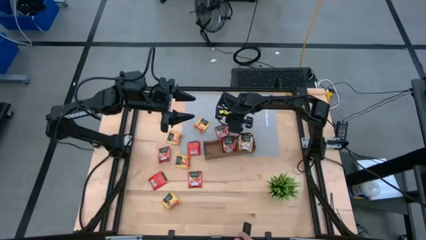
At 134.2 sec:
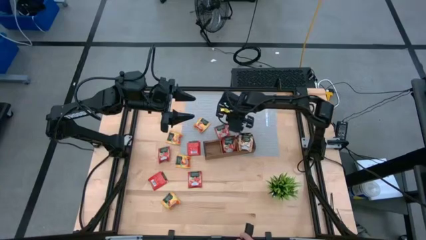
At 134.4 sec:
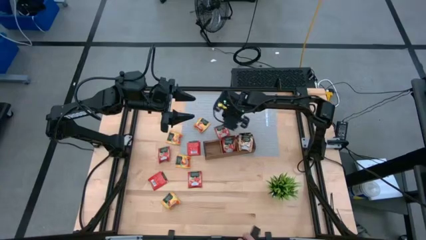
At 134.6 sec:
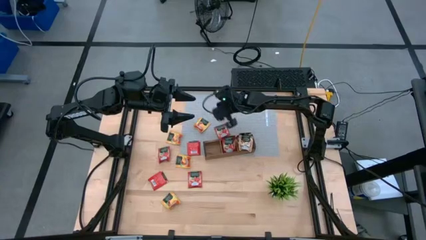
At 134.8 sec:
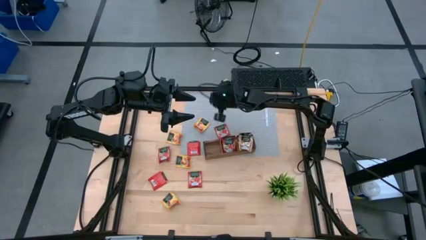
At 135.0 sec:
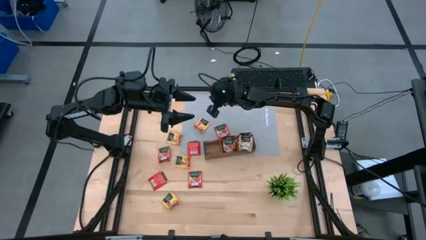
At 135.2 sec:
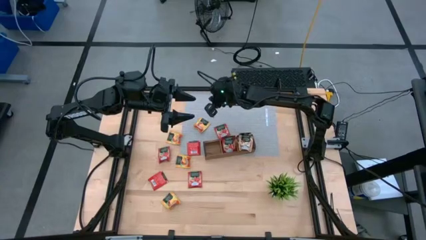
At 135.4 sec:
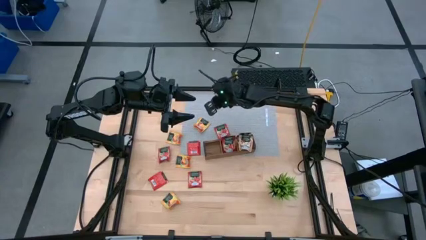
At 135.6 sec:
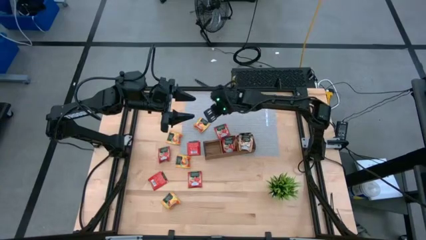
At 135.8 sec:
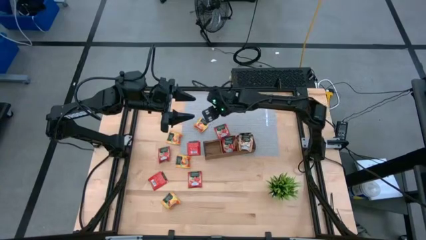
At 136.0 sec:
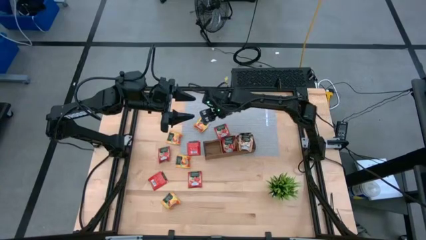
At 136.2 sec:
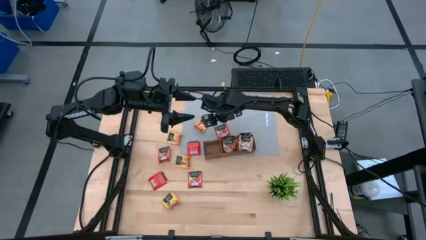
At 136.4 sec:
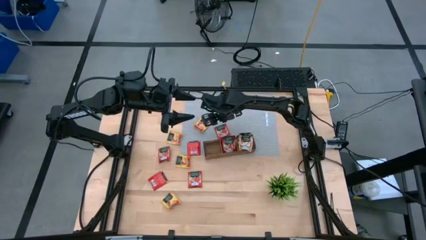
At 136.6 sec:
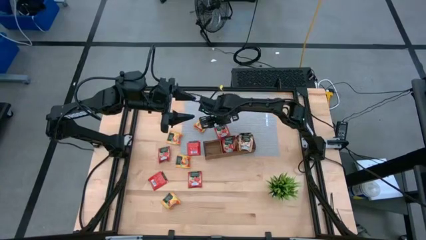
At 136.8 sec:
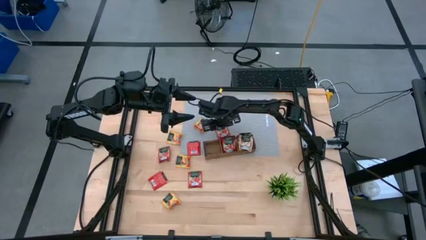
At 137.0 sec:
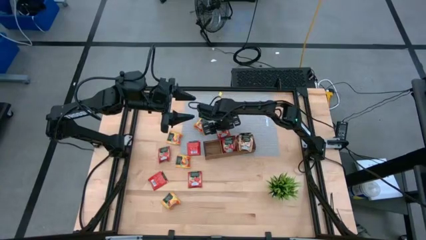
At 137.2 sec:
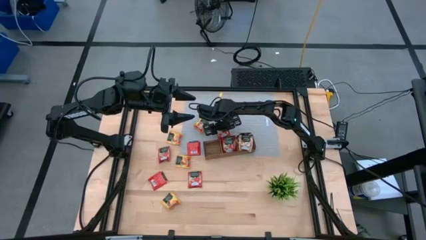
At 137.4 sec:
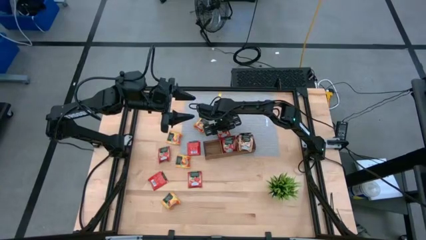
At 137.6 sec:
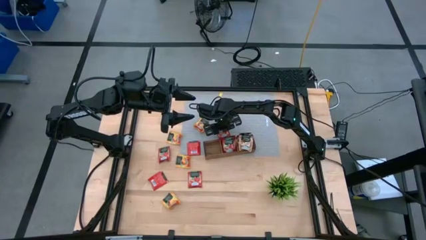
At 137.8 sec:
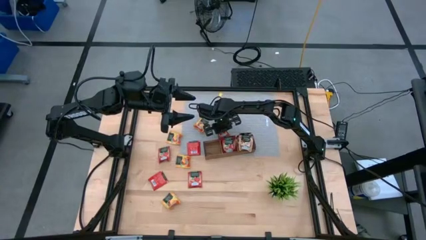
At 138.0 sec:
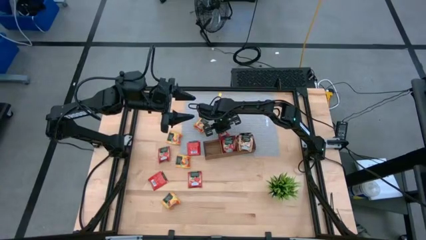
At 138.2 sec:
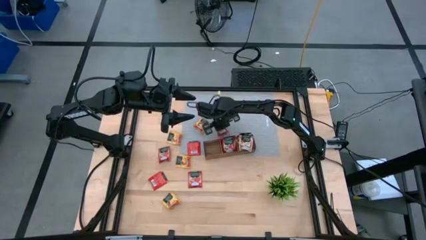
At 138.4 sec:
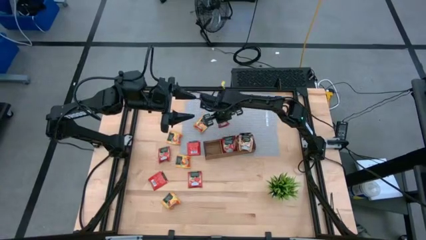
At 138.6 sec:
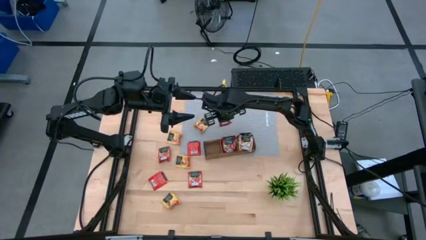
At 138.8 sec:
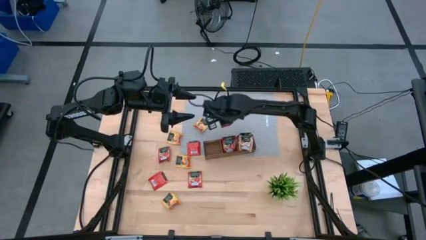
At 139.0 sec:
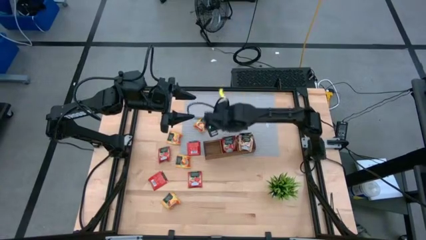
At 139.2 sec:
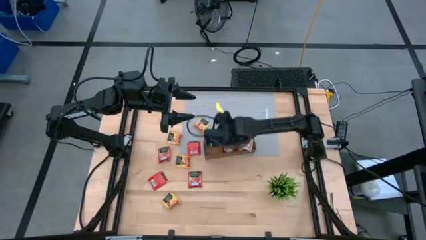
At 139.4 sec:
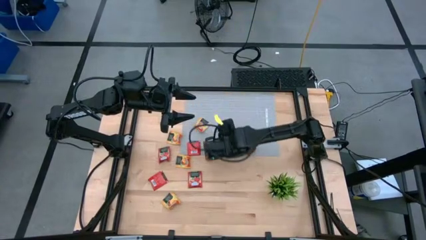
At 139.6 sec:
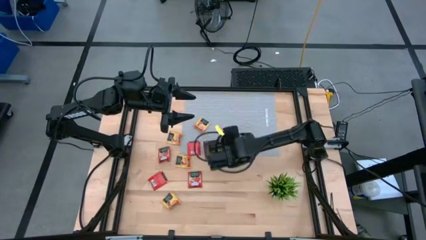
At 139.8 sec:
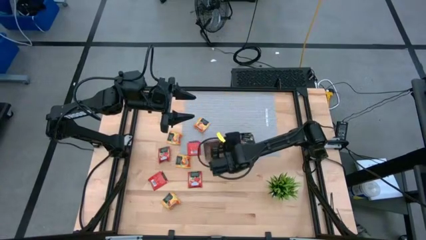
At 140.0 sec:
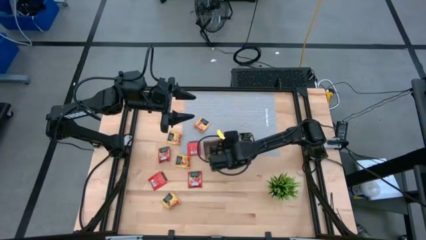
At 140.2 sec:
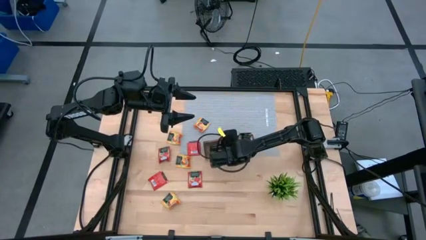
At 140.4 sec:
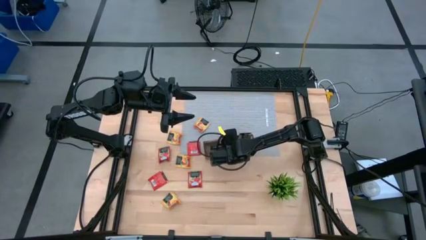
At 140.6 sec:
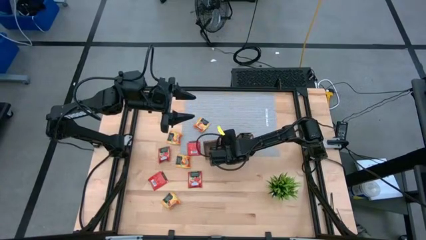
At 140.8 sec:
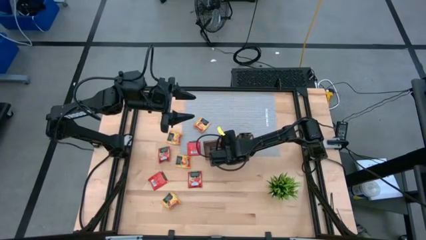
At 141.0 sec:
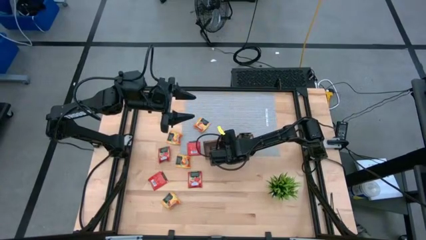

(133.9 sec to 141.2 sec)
Task: Pick & Place Tea
Put the red tea bag into the middle section of the wooden organizer

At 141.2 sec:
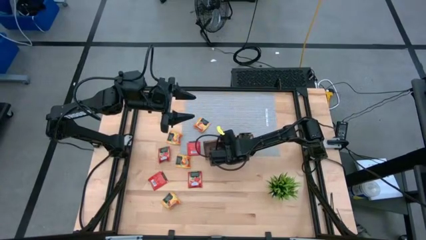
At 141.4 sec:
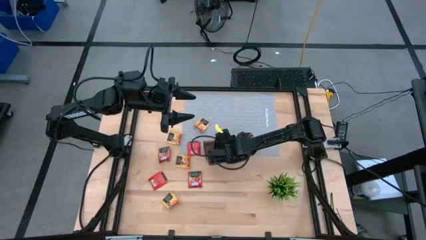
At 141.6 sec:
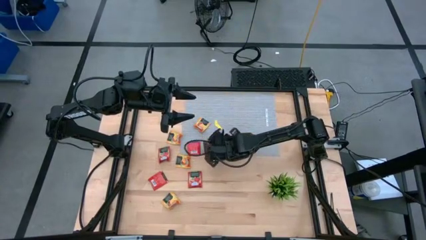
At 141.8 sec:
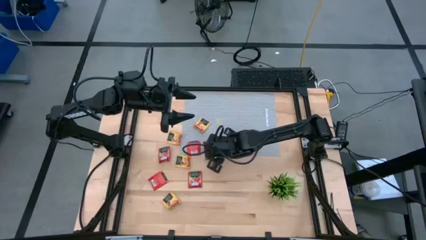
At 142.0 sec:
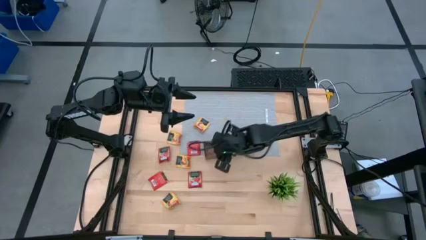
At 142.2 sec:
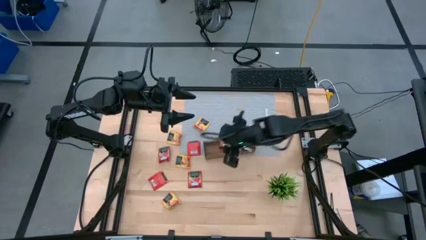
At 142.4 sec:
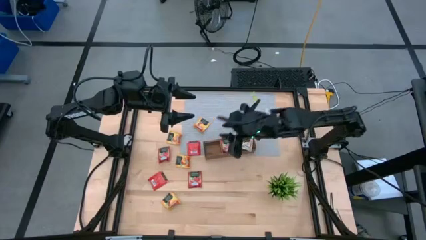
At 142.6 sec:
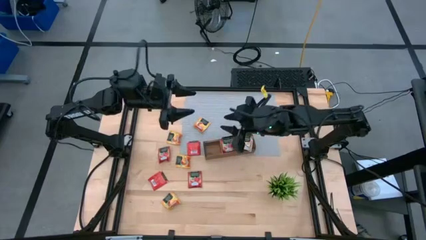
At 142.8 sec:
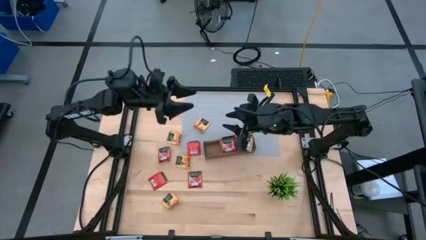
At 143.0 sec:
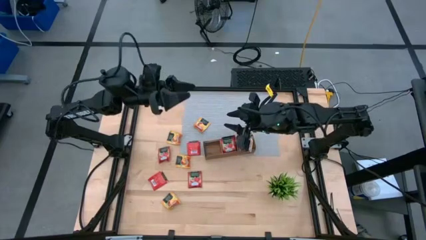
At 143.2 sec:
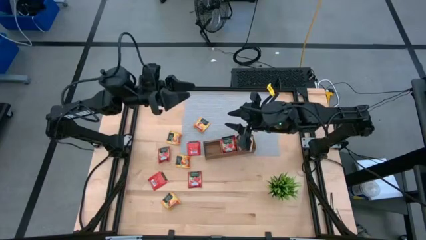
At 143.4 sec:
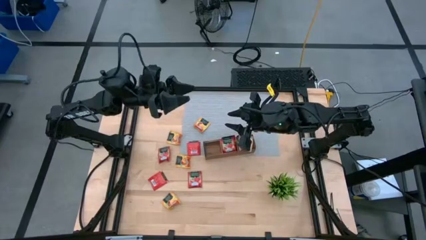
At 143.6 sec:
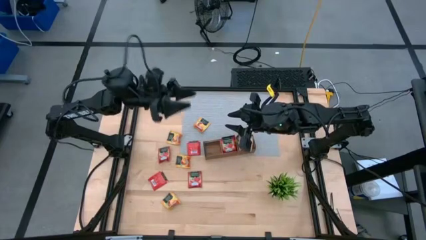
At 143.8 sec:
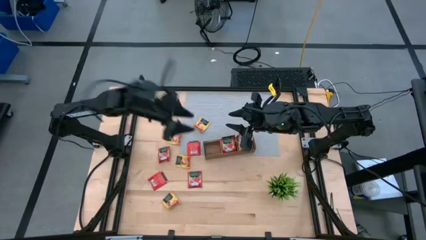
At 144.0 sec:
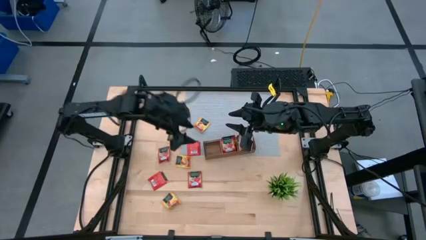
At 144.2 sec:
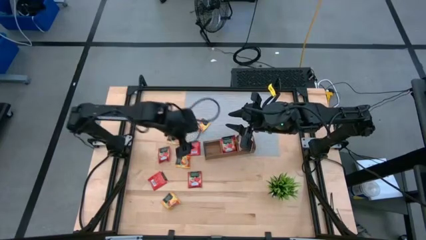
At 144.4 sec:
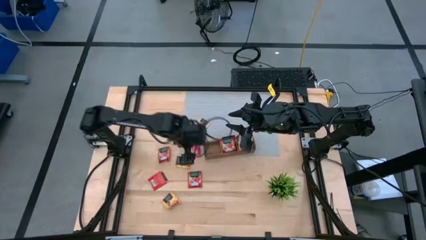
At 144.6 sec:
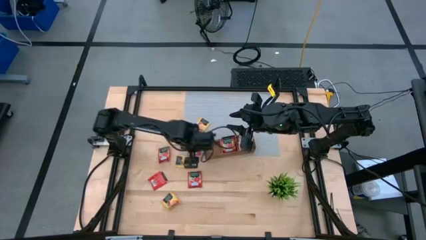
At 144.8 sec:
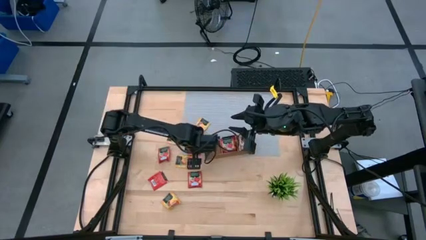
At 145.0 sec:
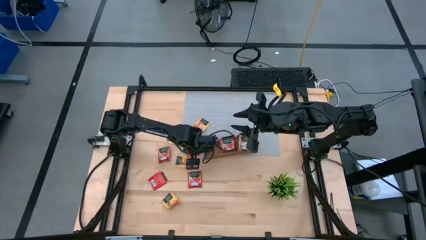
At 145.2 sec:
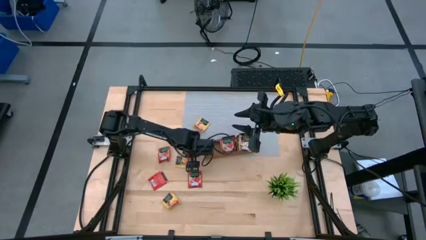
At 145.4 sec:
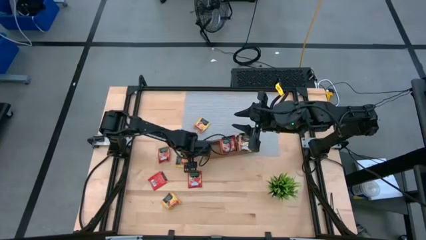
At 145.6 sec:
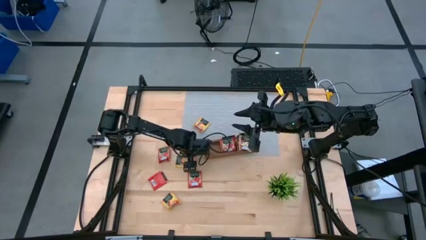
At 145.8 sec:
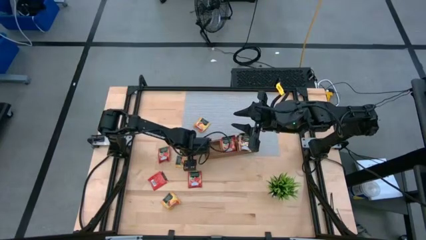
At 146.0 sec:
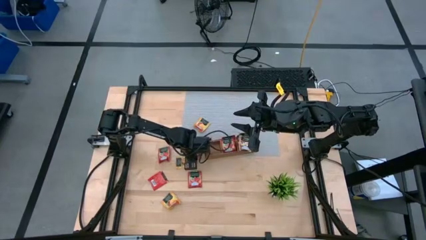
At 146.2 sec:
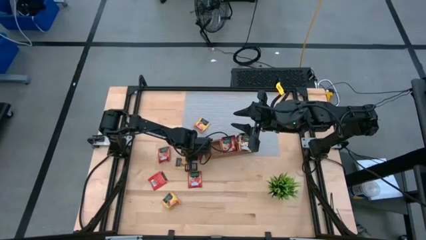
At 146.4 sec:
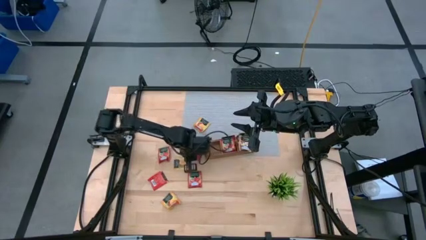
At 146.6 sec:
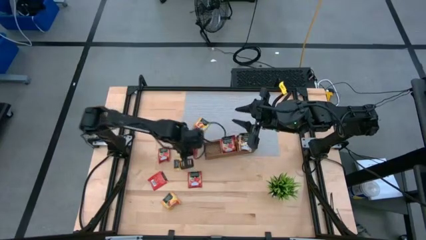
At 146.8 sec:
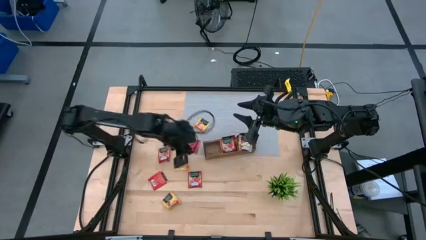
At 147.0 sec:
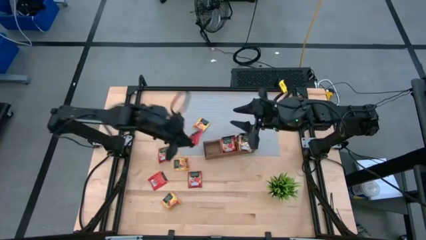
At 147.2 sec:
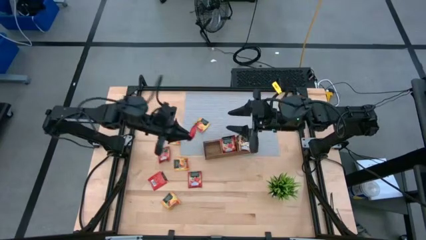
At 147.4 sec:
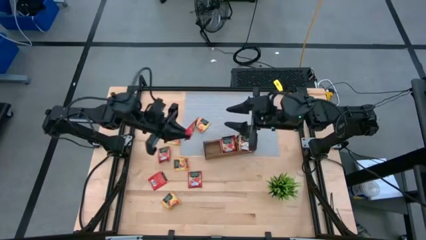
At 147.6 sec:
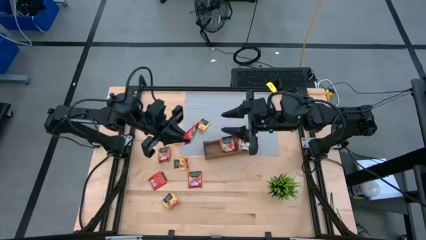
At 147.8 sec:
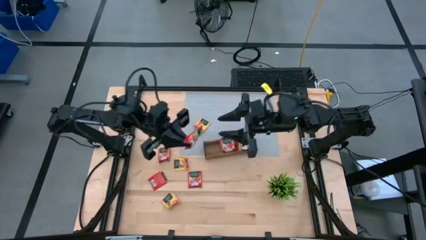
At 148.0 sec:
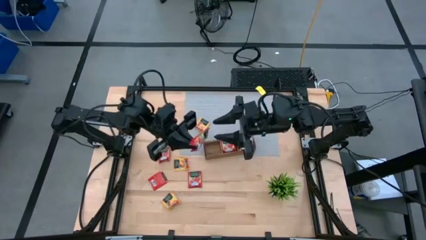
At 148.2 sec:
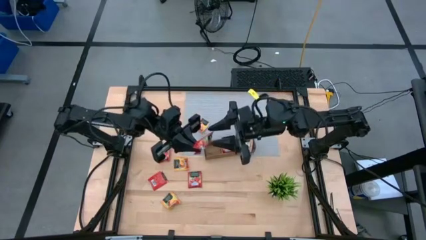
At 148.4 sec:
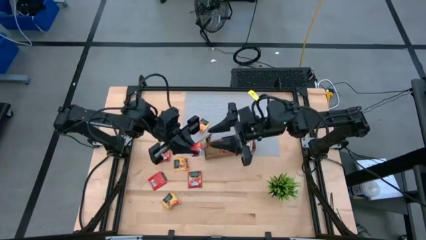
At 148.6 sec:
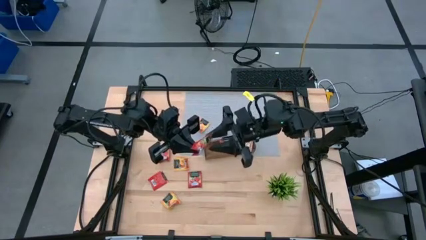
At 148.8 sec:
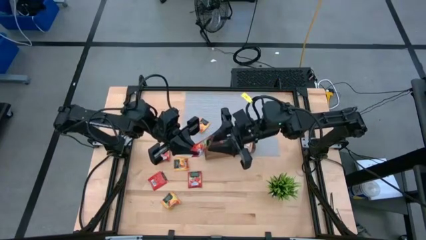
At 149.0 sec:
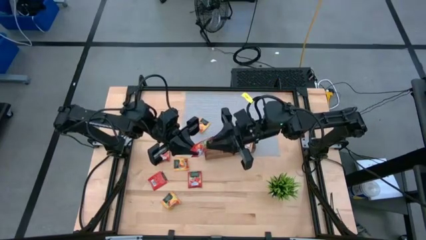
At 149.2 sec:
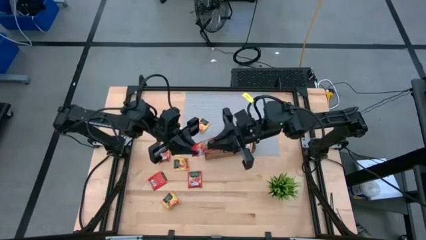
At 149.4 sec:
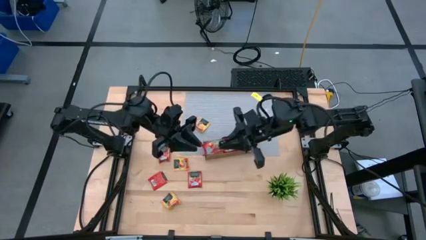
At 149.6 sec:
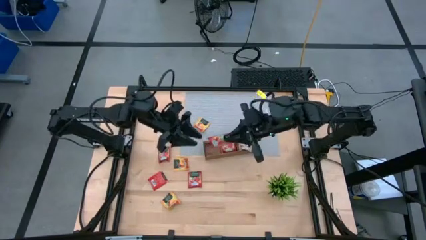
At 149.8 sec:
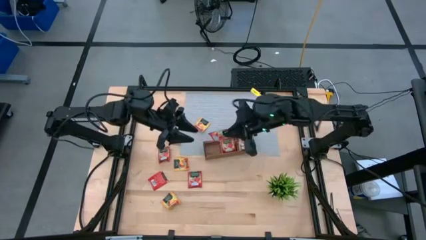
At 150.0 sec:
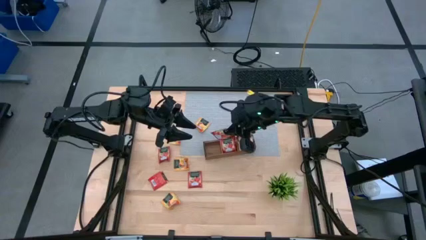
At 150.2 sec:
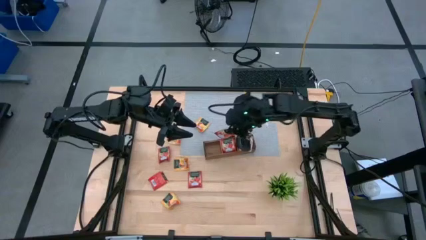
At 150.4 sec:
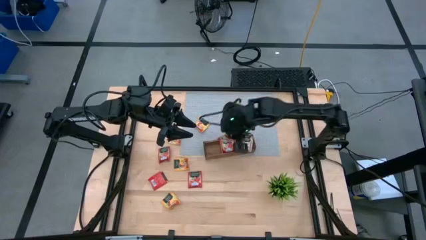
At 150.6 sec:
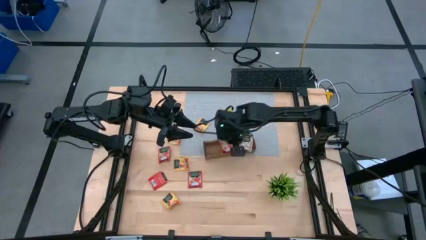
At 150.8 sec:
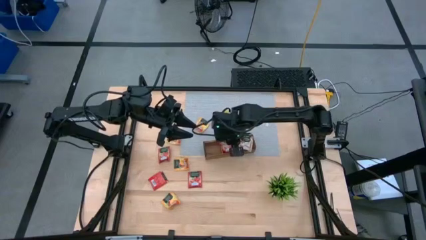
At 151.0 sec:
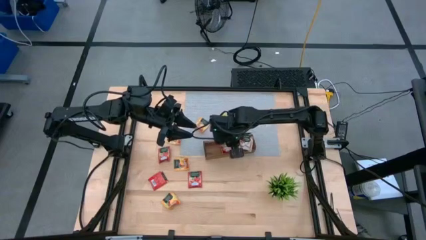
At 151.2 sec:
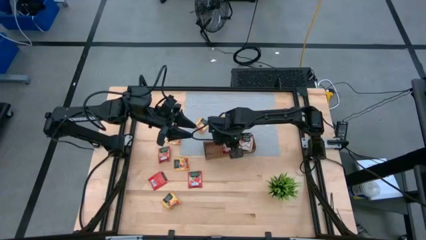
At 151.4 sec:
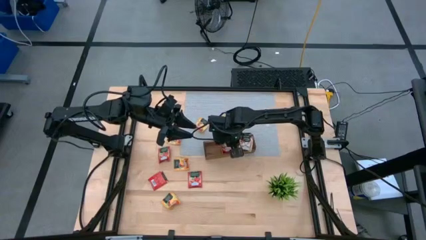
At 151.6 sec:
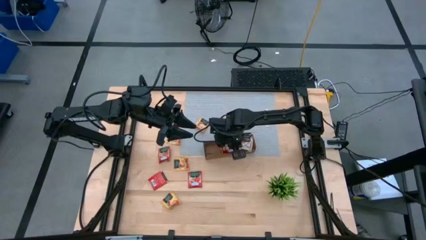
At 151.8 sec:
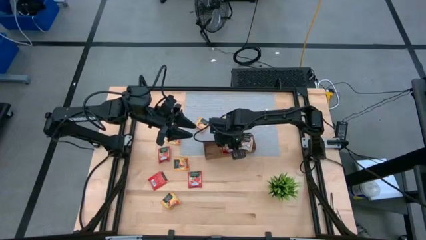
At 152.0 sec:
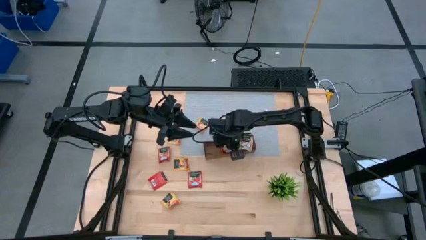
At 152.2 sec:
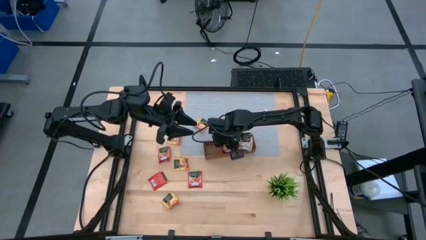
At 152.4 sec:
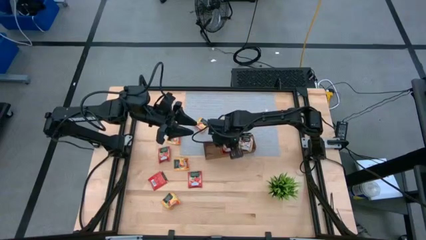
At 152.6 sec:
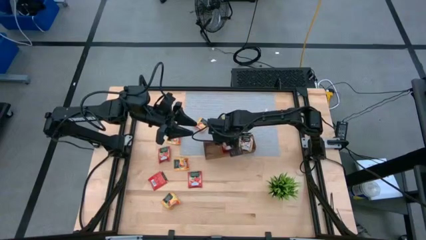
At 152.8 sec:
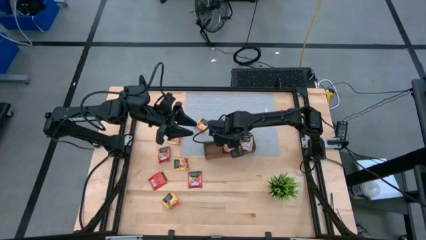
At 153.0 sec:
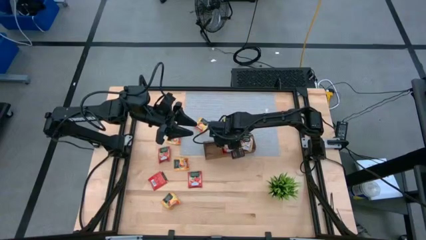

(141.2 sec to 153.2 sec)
Put the red tea bag into the middle section of the wooden organizer
